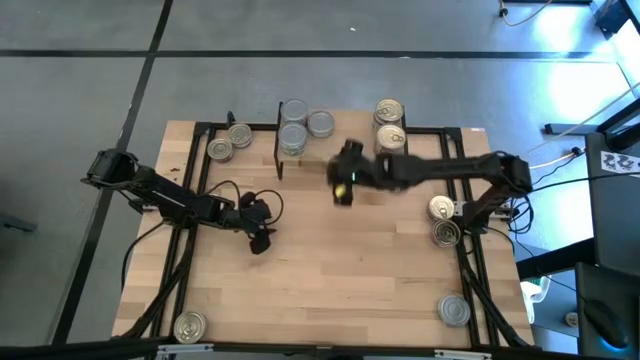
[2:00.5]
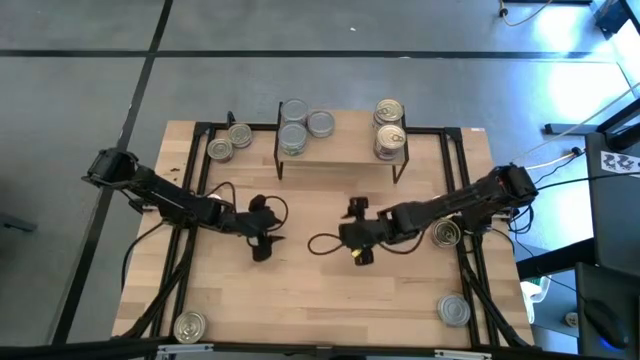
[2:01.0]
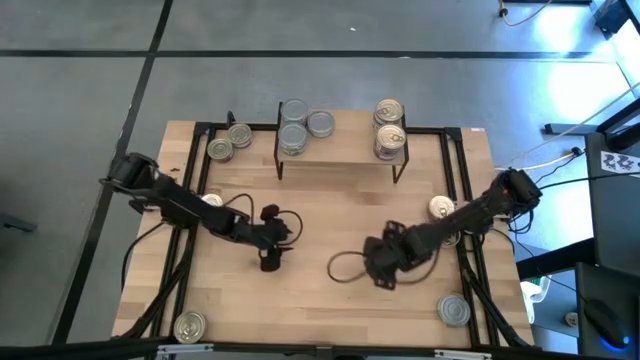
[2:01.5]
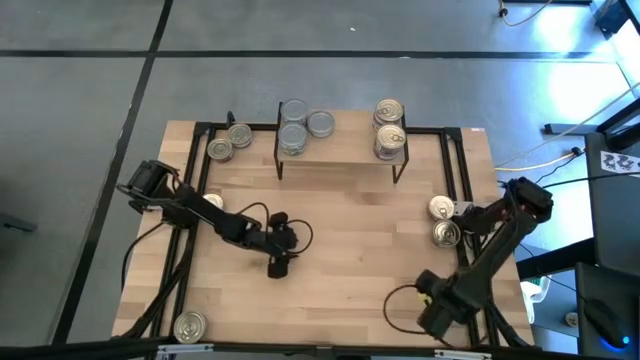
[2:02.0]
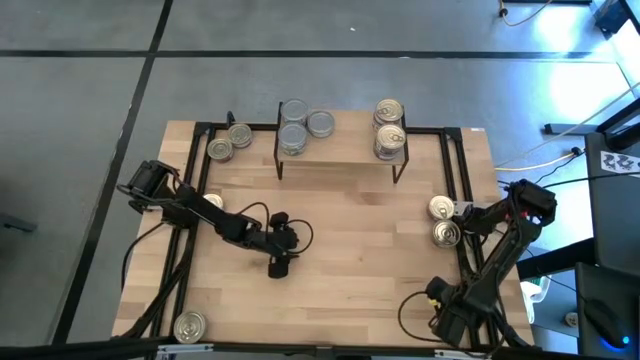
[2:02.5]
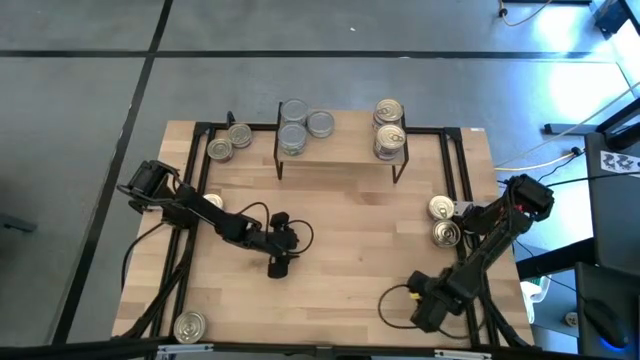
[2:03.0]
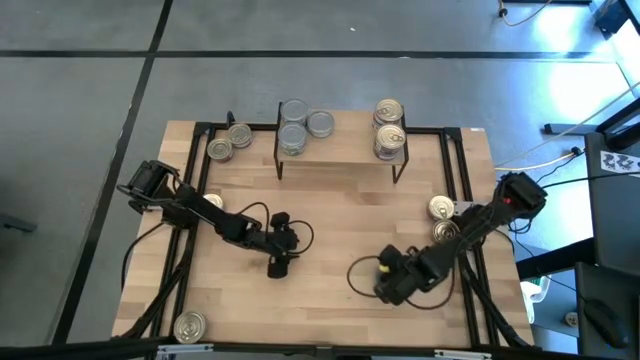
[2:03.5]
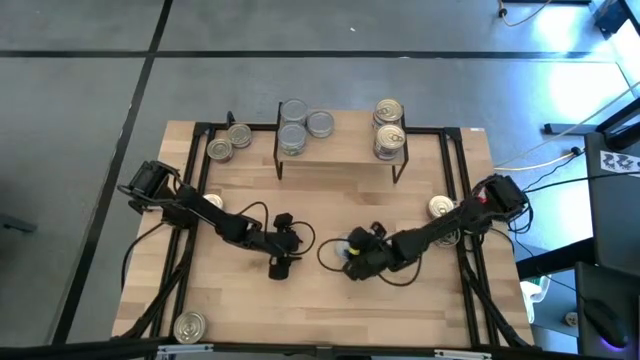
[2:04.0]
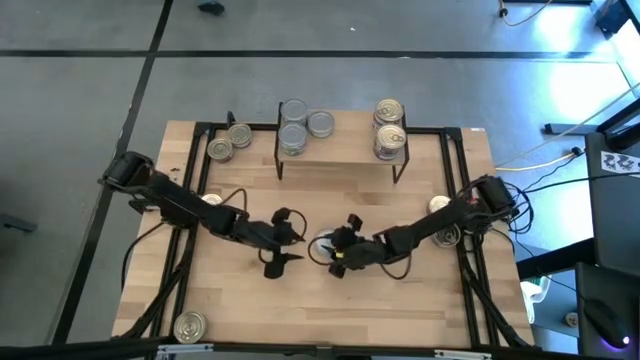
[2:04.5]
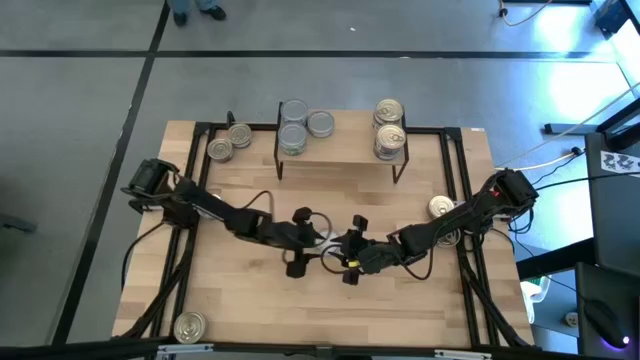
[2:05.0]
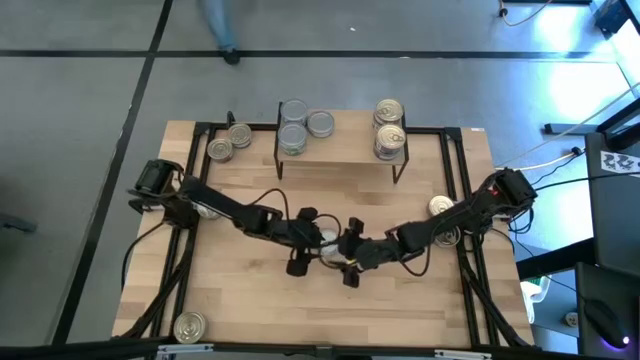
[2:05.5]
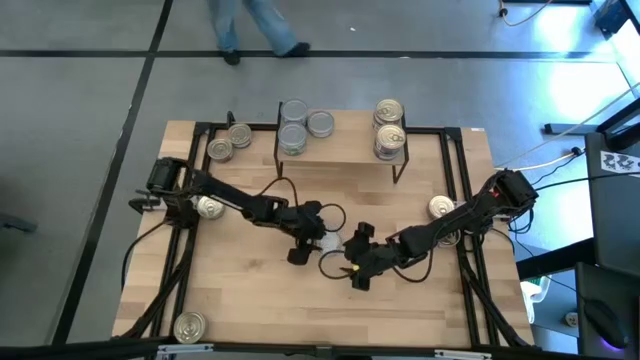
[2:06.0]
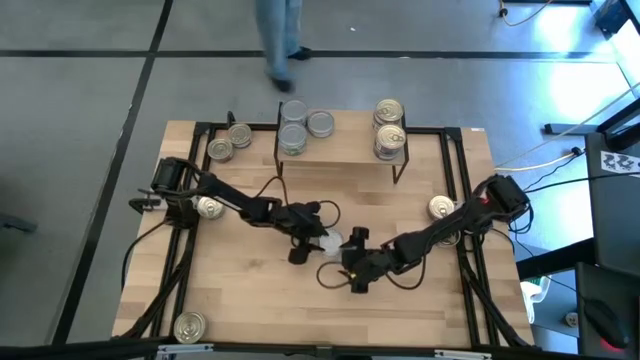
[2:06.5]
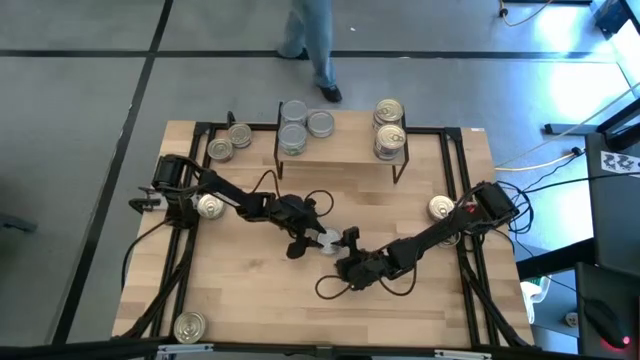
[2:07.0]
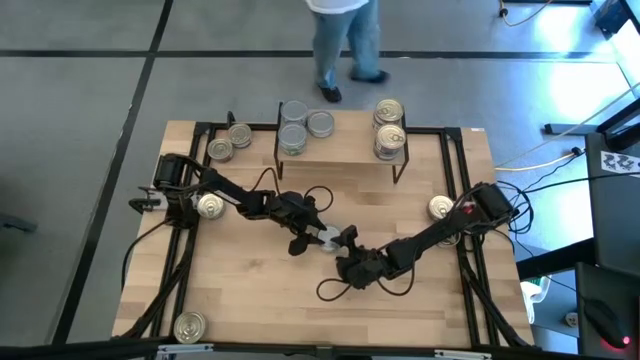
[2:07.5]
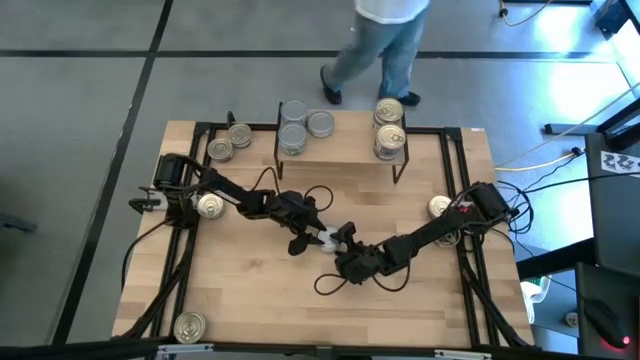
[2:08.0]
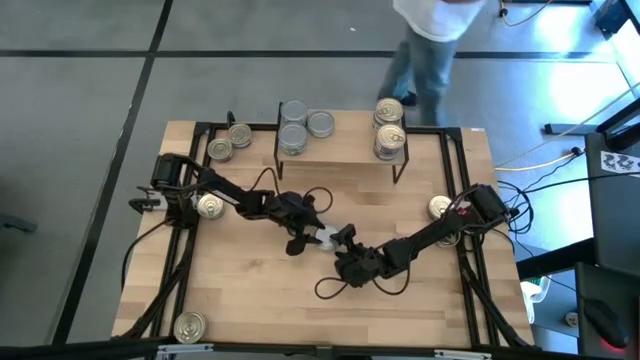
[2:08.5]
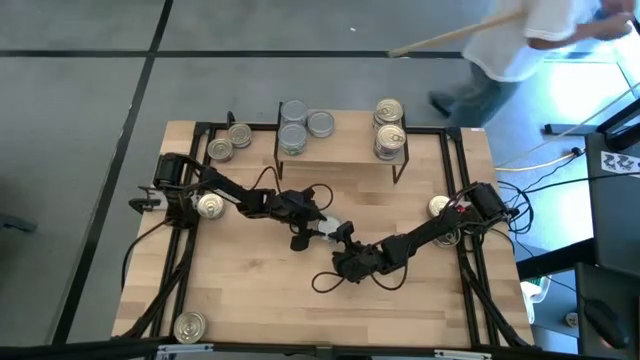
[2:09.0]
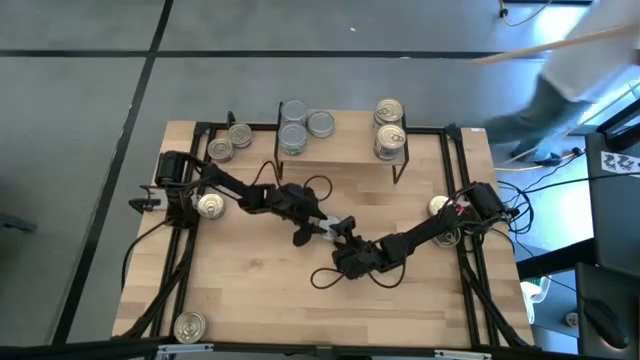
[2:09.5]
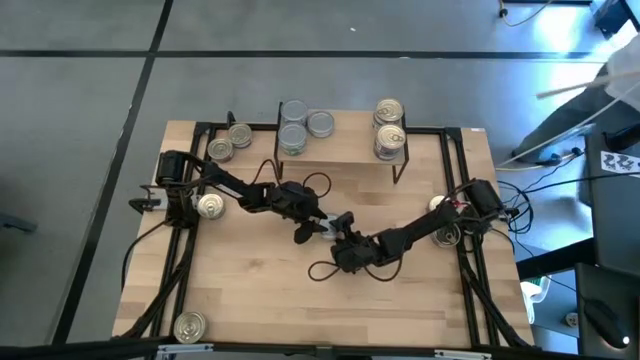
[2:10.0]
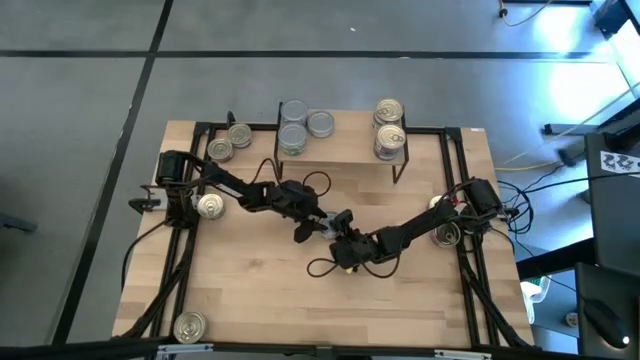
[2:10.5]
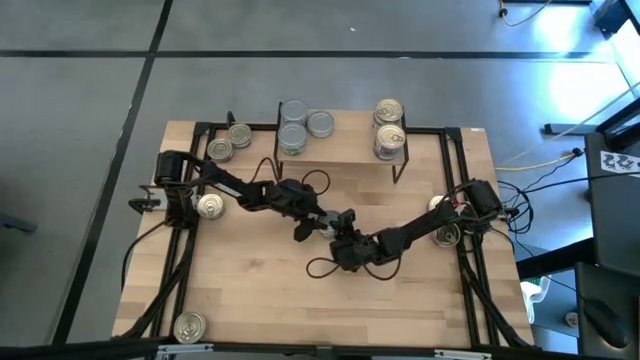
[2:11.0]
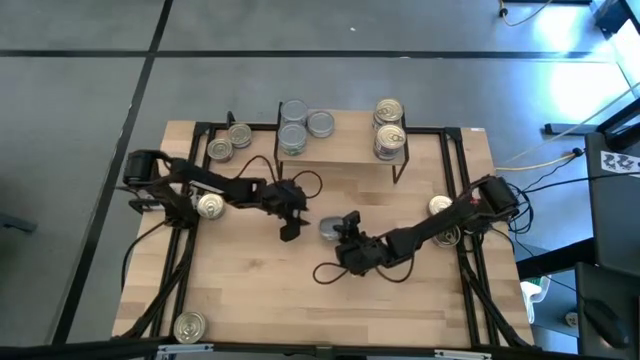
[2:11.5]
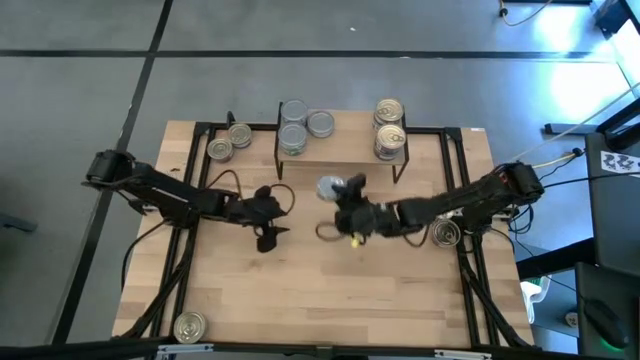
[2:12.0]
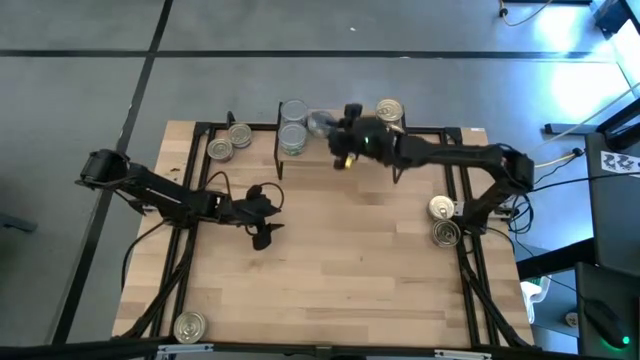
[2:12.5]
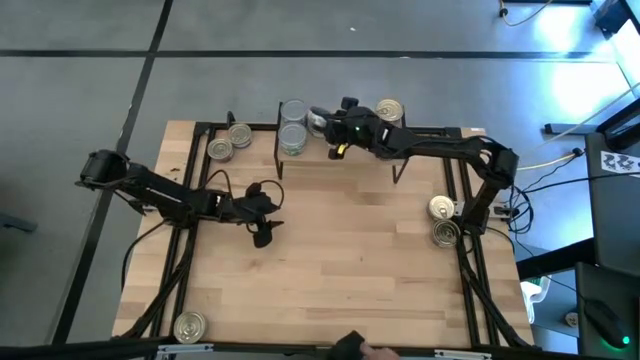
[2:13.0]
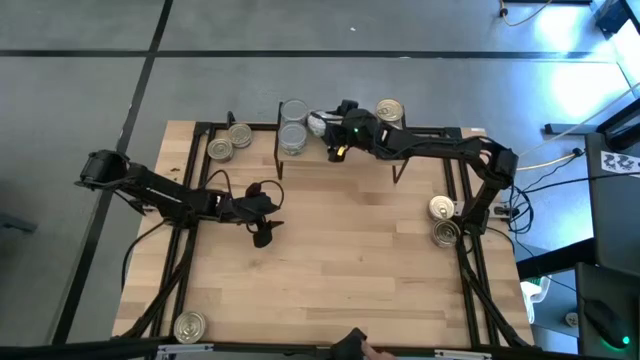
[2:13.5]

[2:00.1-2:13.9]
Task: Stack canned seafood by type on shelf
Stack the green white tuna can on top of the other green white tuna can on the shelf

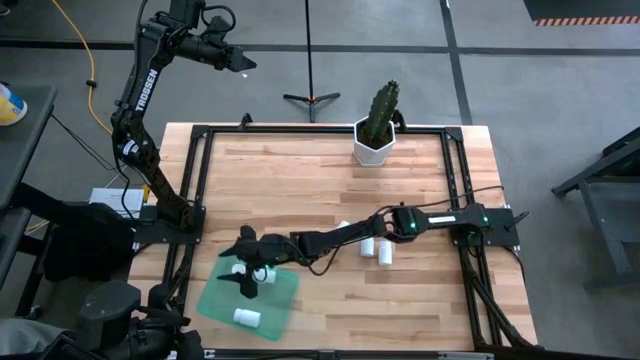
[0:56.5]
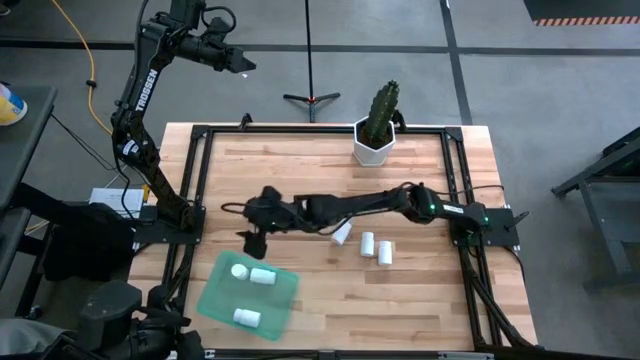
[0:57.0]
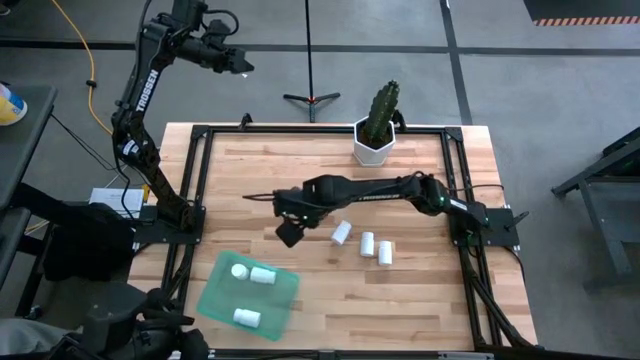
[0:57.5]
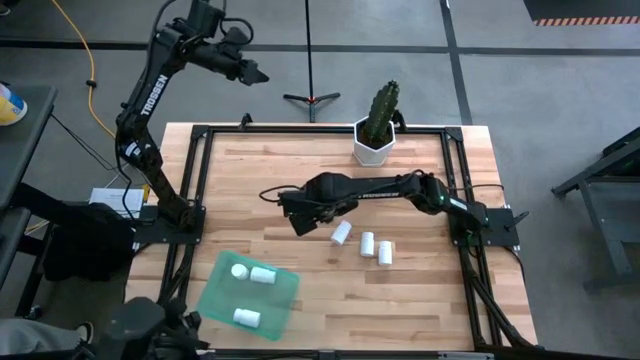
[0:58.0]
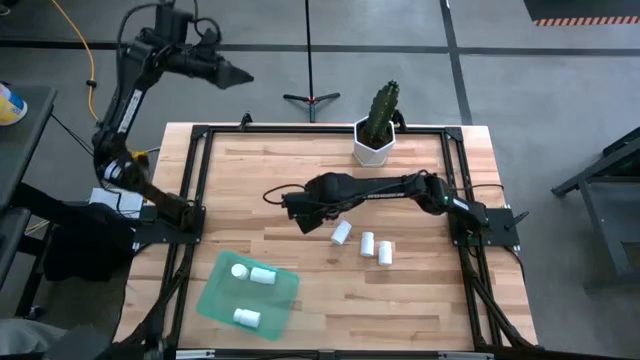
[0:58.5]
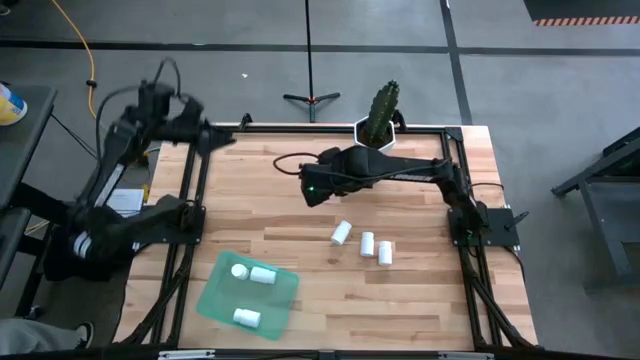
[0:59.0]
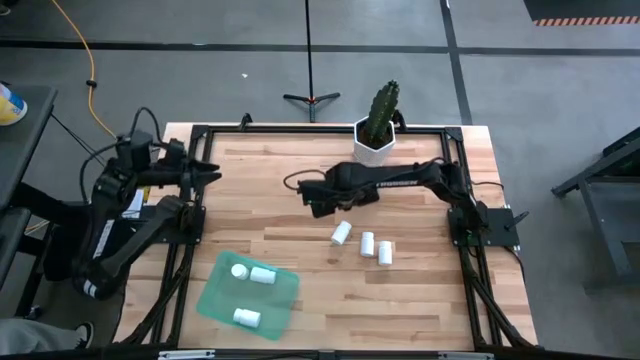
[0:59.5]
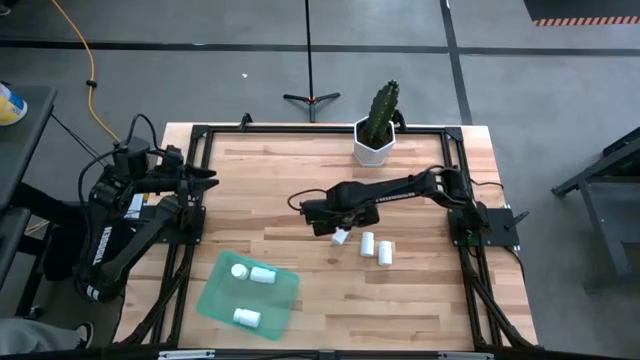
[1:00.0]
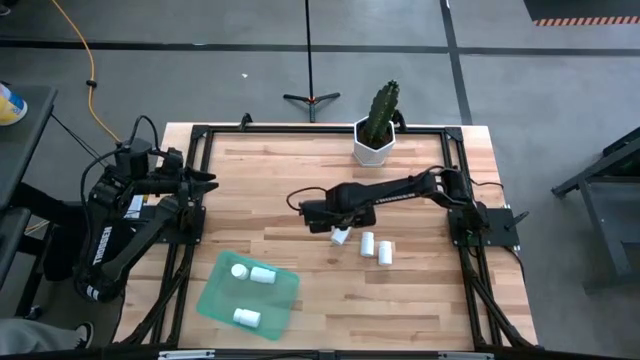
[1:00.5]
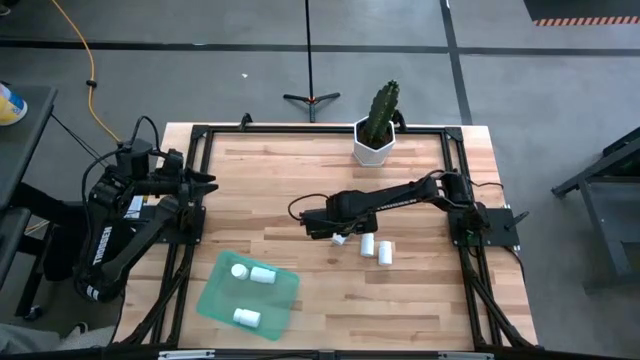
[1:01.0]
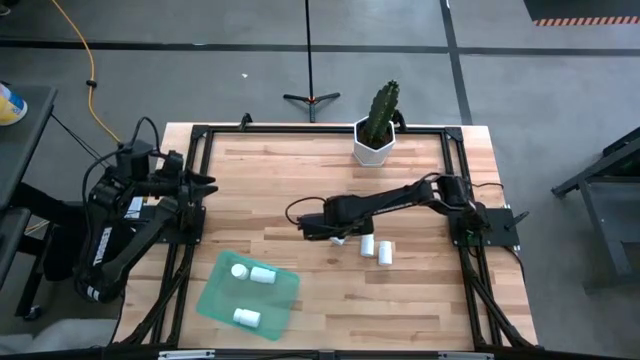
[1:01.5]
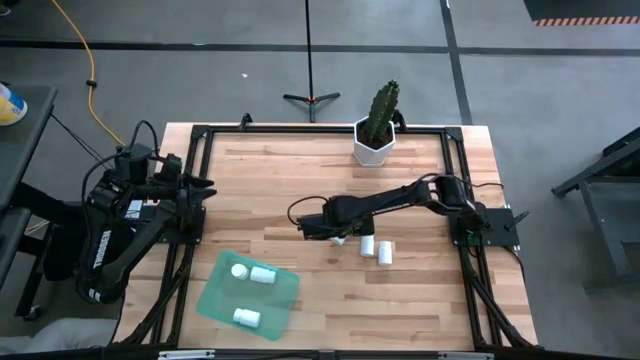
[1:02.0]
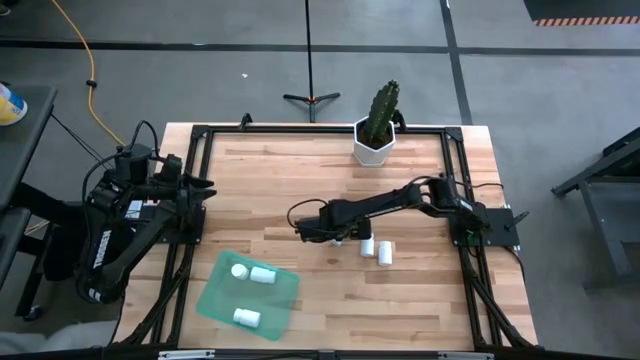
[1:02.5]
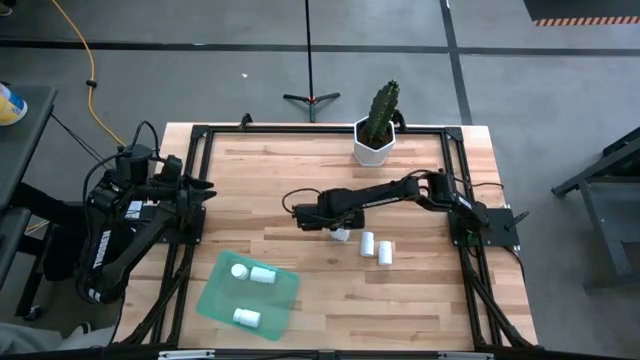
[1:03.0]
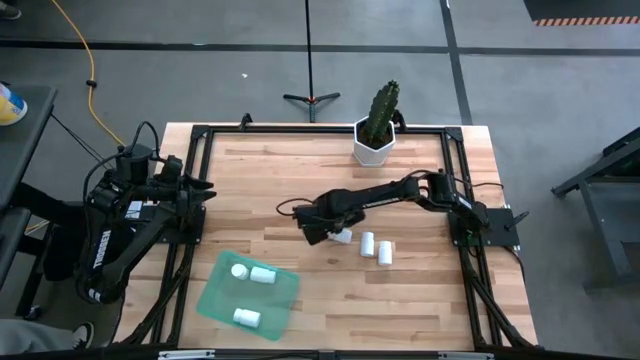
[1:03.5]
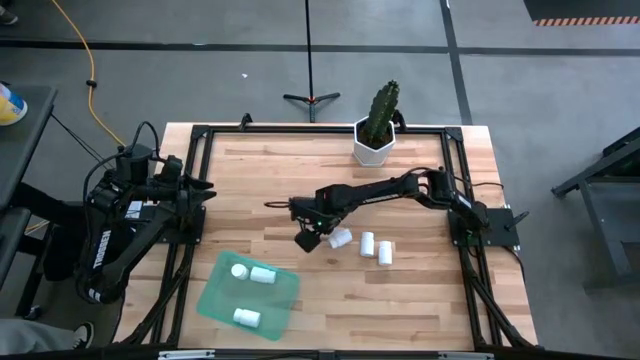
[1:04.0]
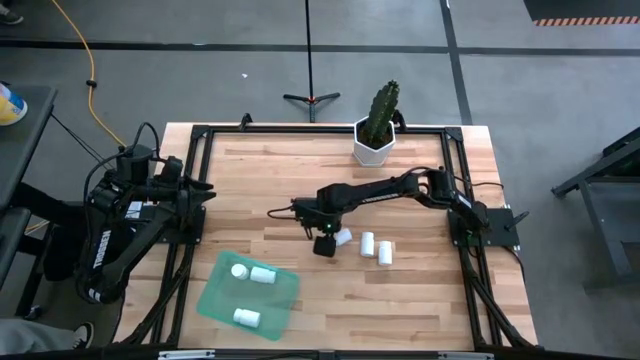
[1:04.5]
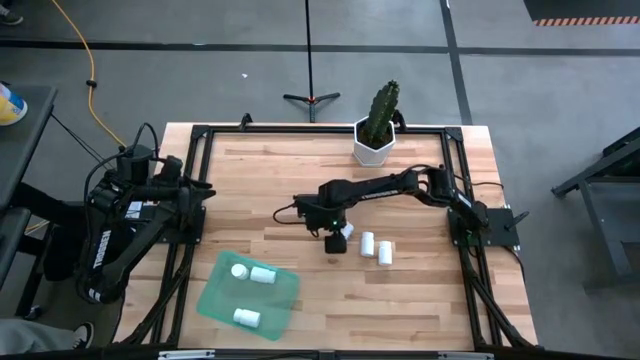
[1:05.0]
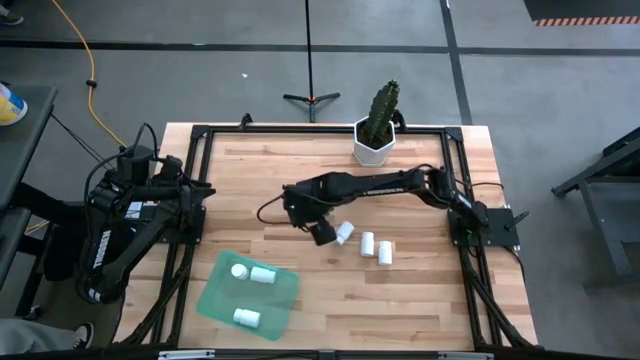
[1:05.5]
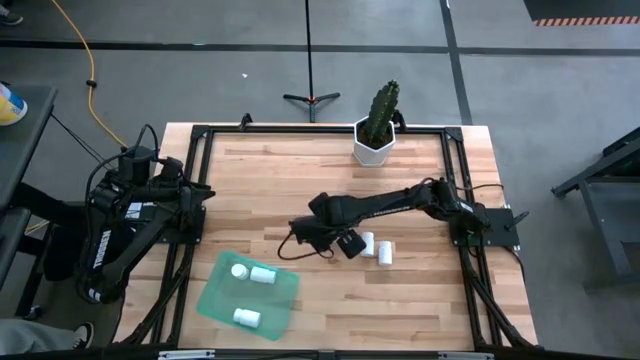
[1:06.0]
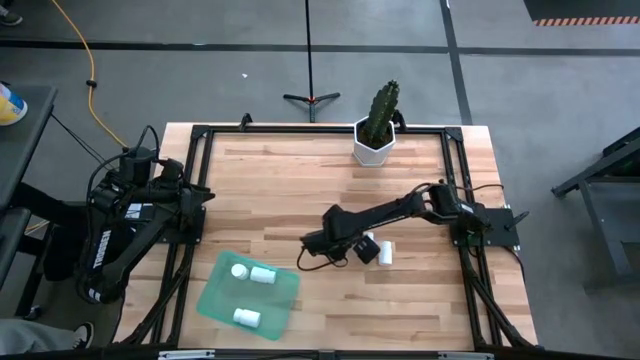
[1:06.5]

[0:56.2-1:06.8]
Task: Pick and place pill bottles into a basket
Put the white pill bottle into the green bin
